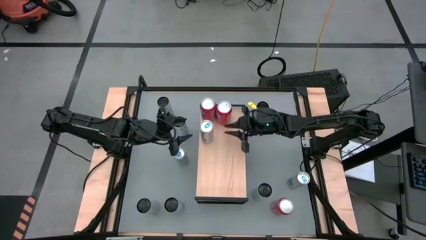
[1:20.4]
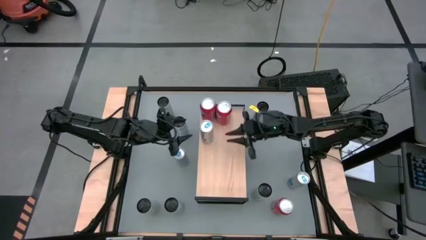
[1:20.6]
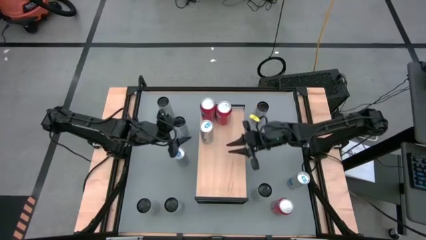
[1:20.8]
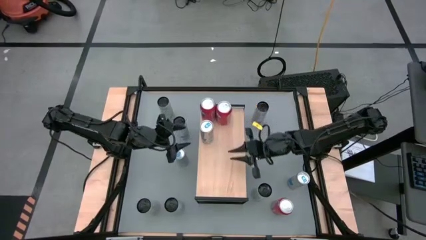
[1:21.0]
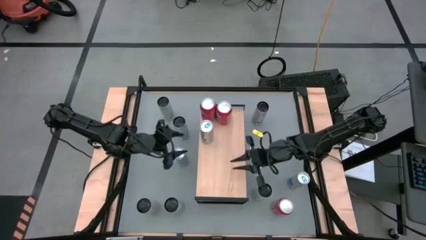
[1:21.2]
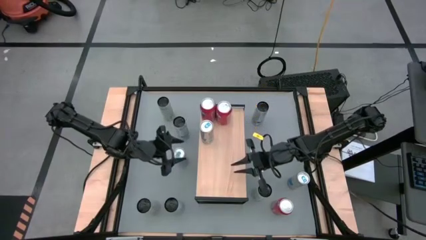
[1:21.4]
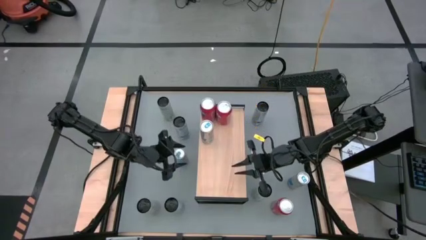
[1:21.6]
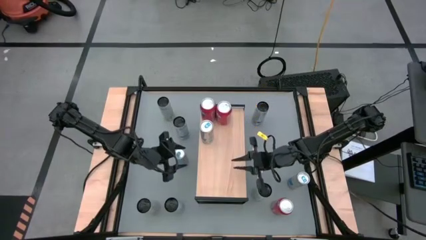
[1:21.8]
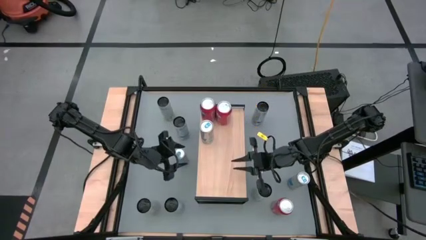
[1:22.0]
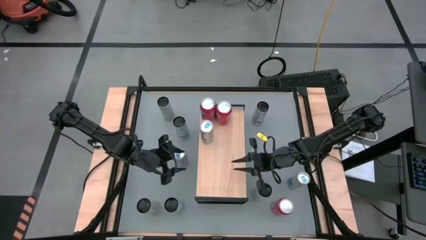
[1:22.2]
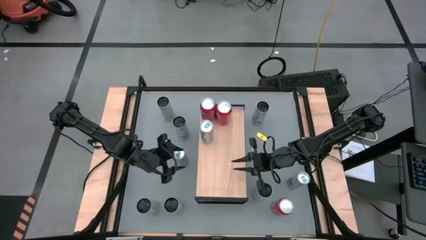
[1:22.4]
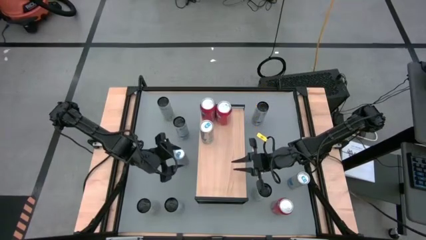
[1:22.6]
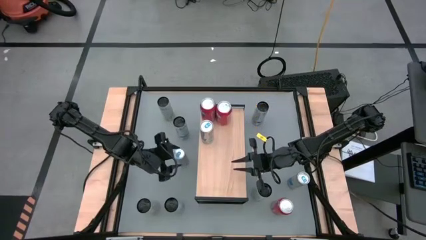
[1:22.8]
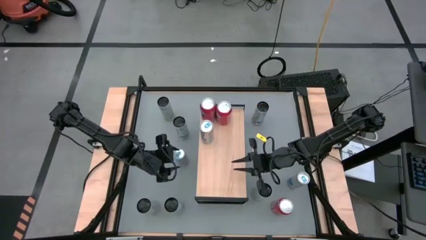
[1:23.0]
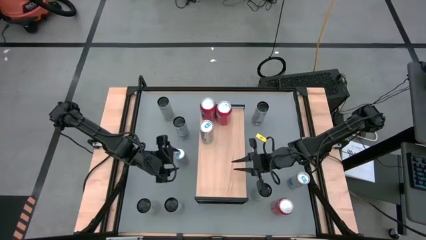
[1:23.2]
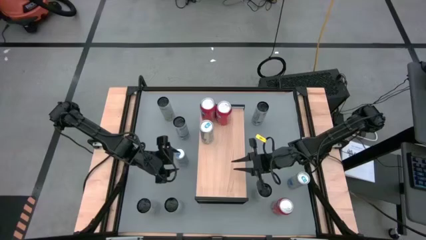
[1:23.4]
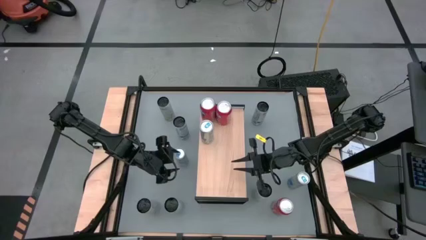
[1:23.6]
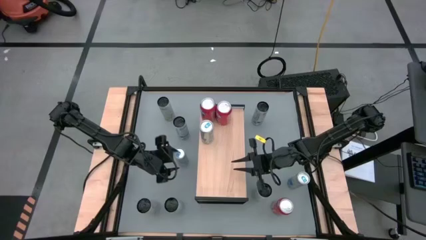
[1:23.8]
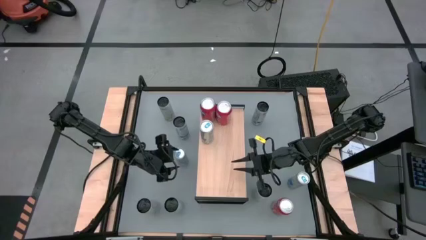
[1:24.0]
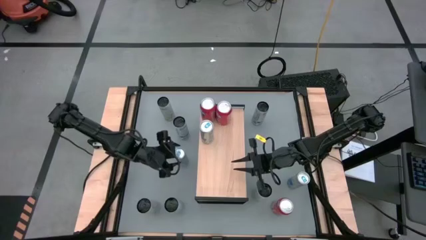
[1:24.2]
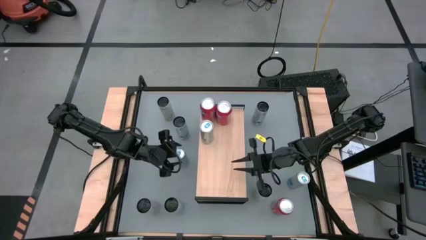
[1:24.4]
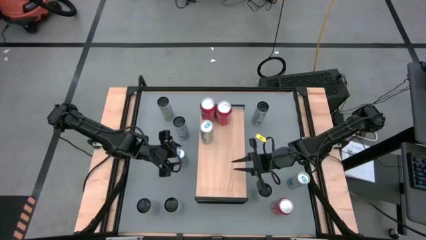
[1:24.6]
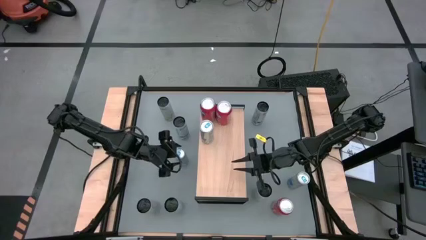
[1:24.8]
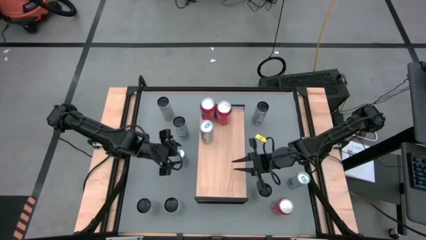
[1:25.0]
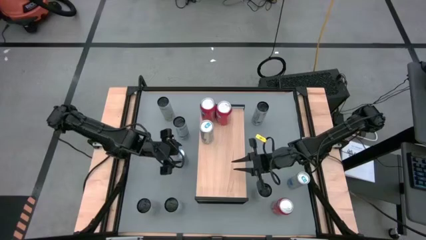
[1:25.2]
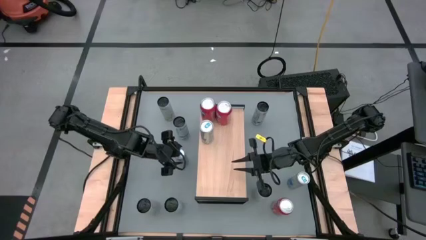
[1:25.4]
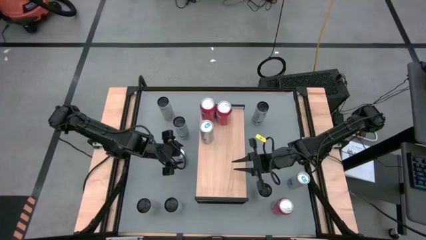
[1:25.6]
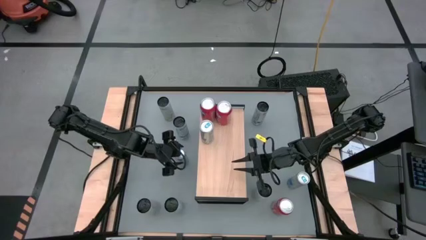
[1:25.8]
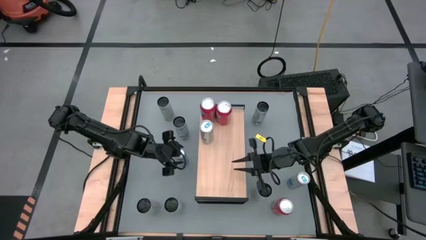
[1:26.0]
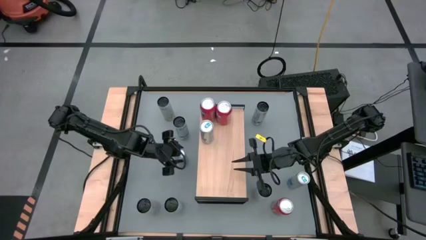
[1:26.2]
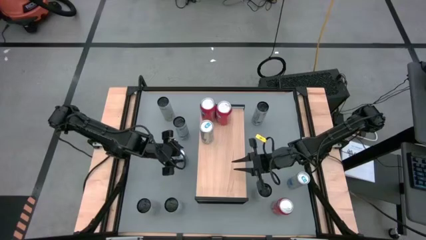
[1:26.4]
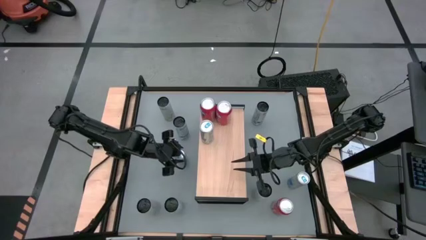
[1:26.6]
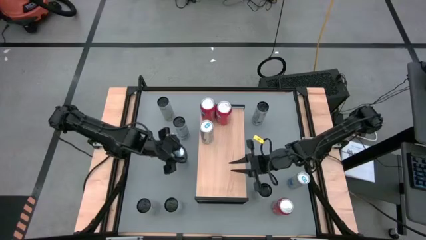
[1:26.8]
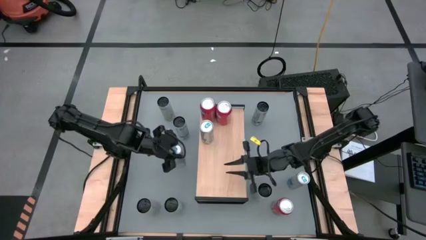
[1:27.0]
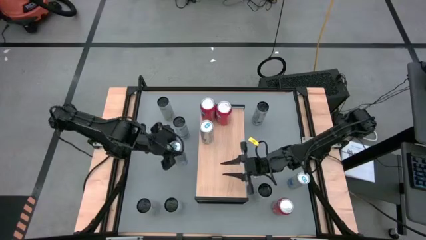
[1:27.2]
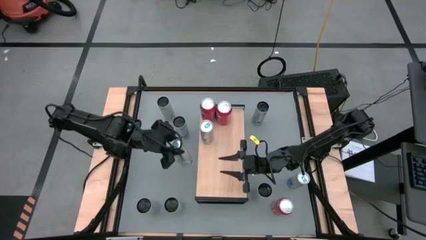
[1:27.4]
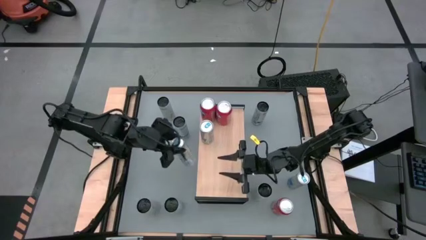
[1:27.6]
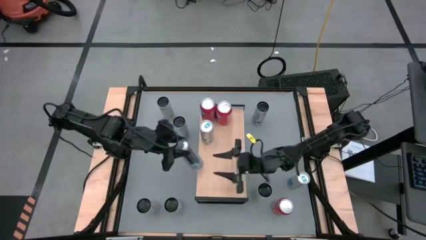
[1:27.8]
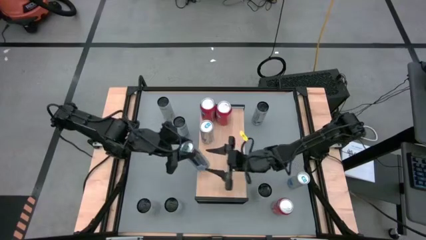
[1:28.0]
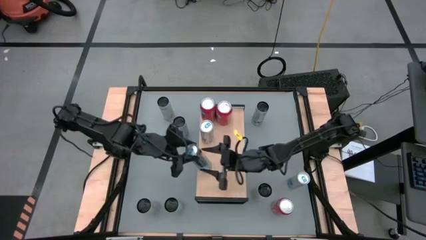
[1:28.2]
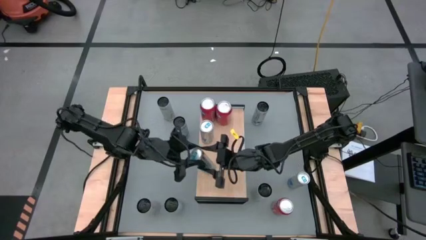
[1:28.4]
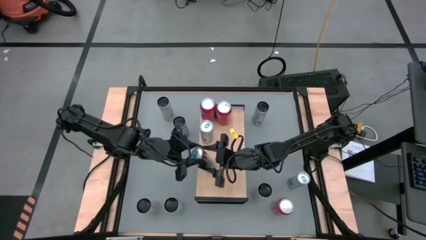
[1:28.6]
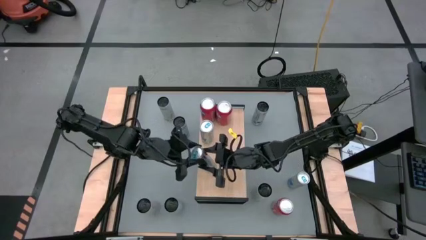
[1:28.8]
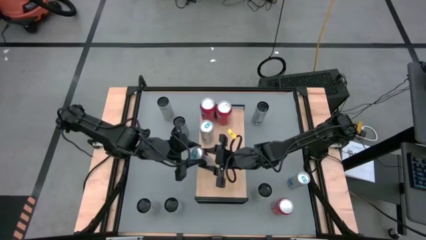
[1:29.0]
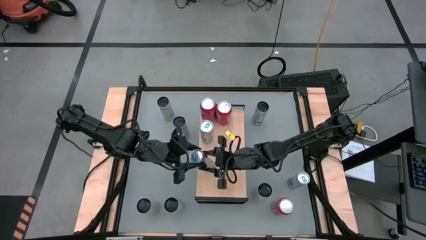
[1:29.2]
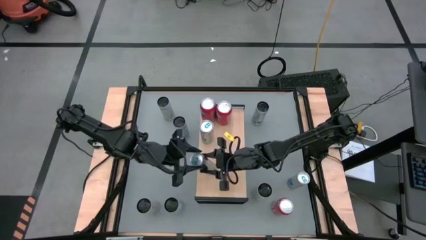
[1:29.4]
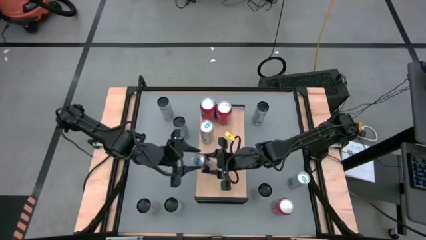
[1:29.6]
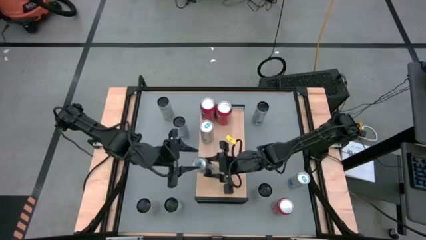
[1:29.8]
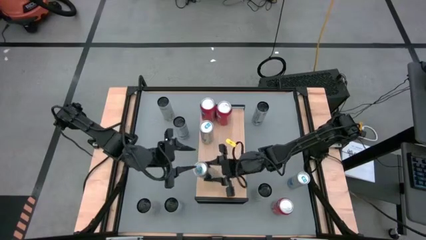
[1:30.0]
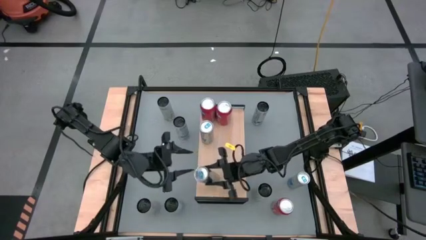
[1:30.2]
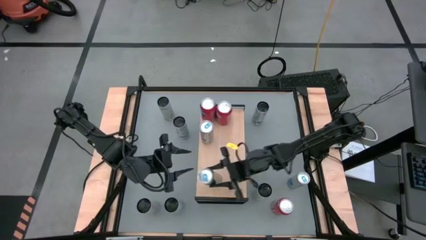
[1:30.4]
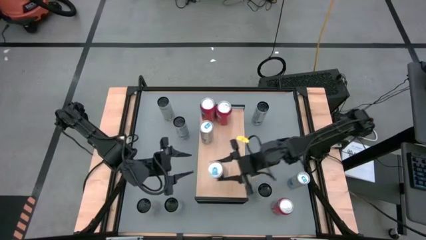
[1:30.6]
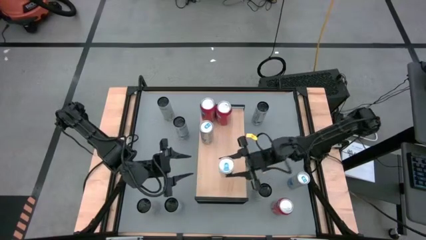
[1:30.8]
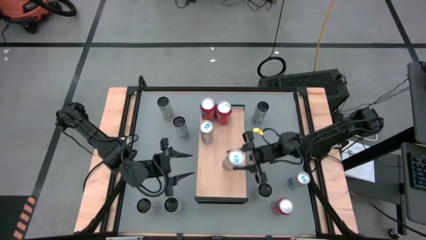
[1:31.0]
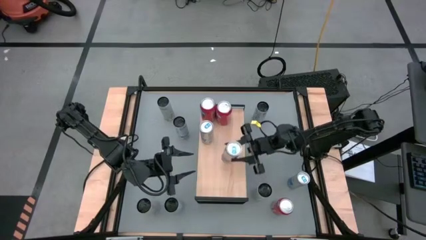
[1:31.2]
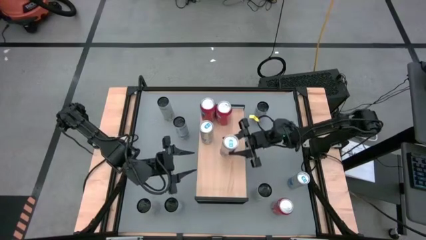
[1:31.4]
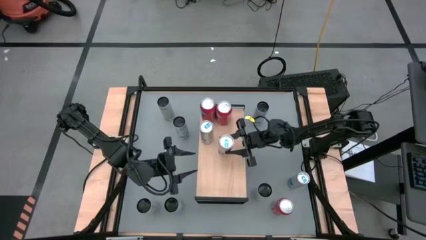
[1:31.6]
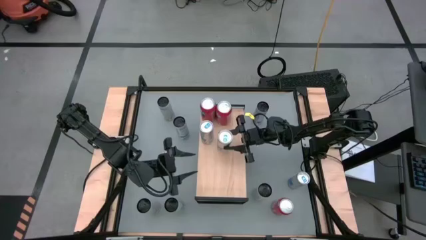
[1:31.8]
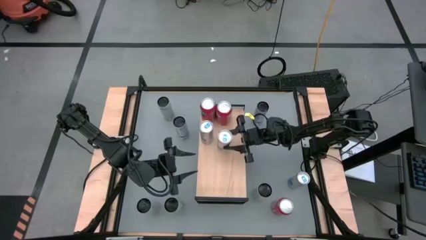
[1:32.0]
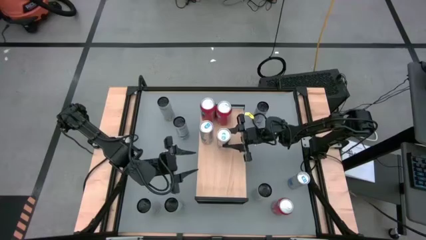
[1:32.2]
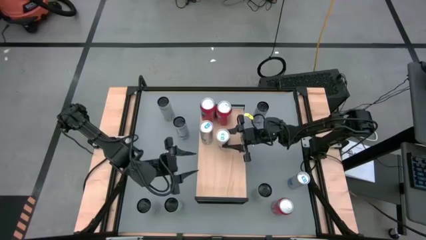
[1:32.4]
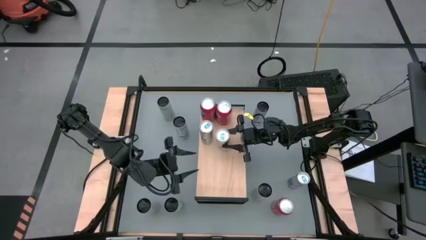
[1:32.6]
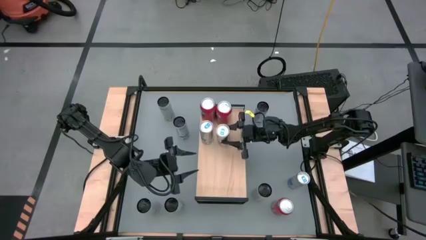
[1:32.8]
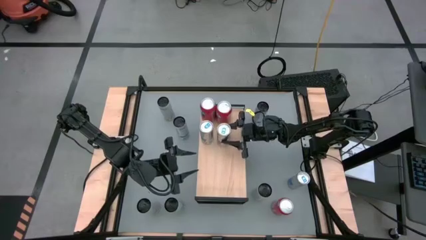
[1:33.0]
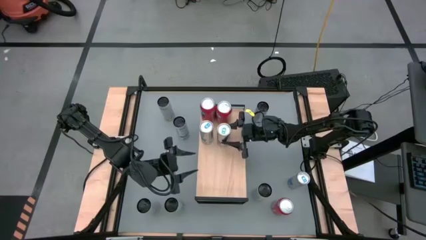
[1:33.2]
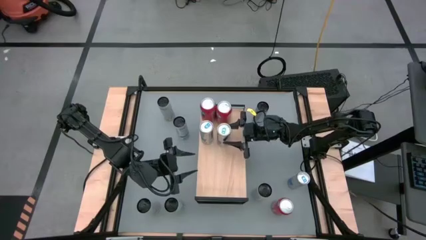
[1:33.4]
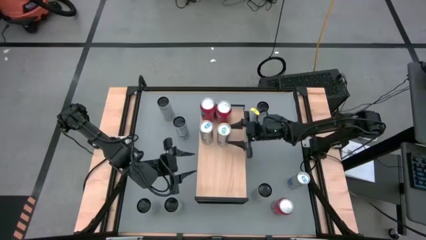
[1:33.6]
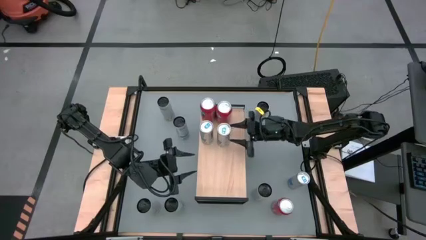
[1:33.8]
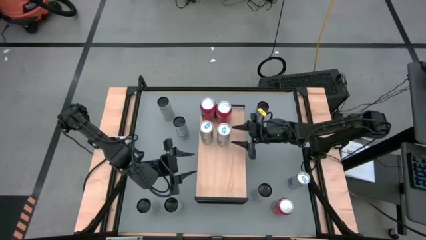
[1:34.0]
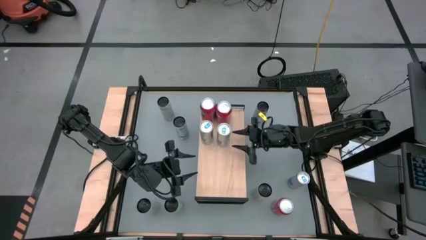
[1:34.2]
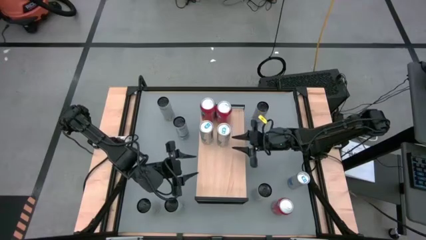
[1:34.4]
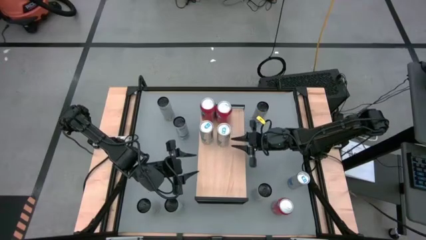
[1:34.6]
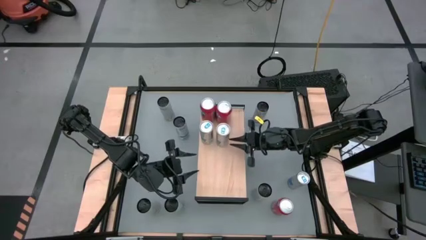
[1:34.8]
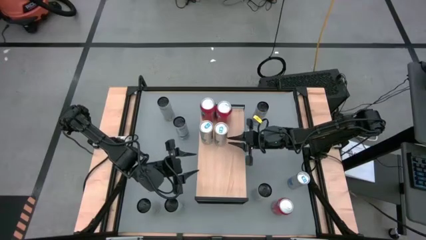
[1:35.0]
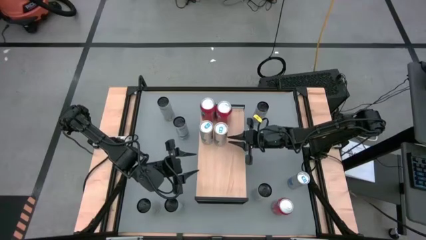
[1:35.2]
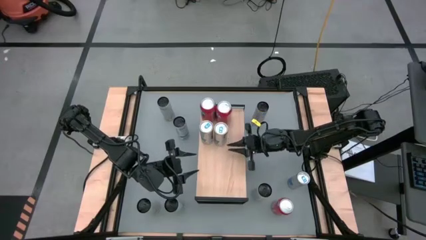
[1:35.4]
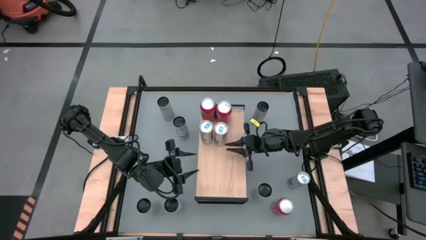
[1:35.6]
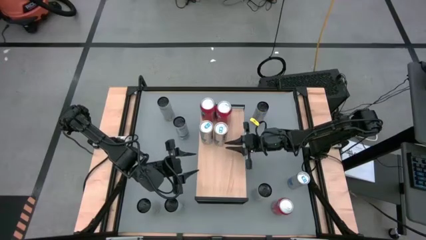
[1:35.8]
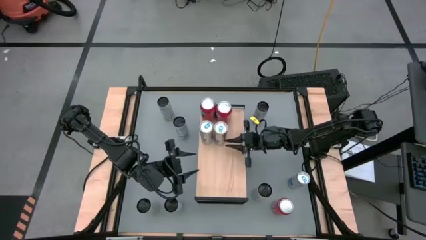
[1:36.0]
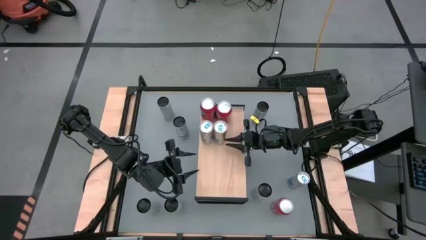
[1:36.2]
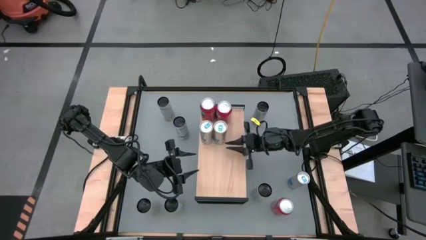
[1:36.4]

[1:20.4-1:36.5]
Task: Place canned beverage on shelf
Put the left blue soda can on the shelf aligned with the other orange soda can
